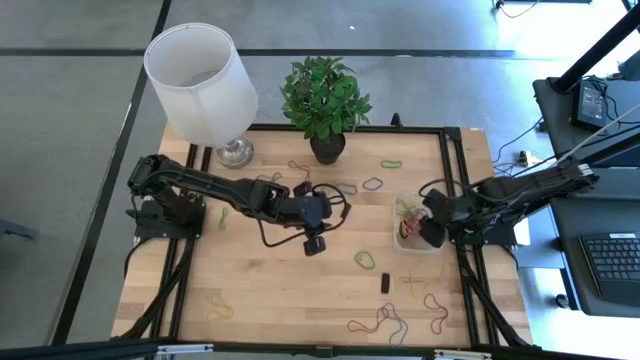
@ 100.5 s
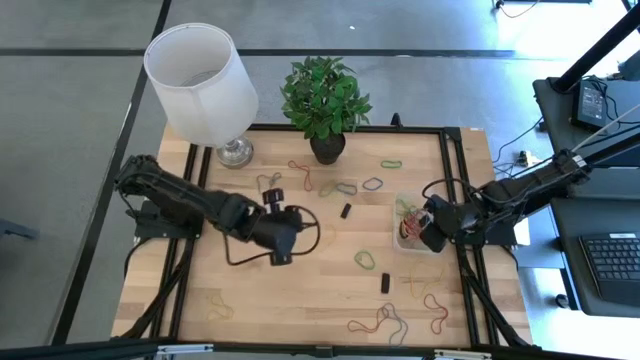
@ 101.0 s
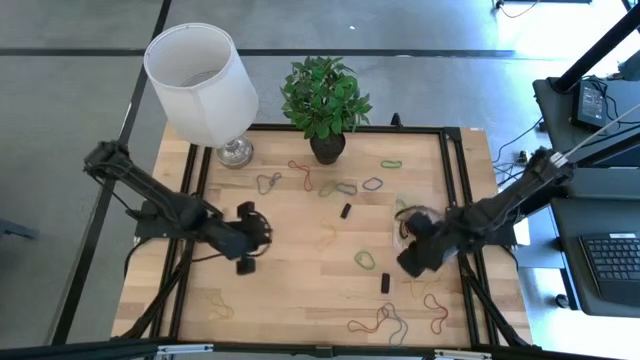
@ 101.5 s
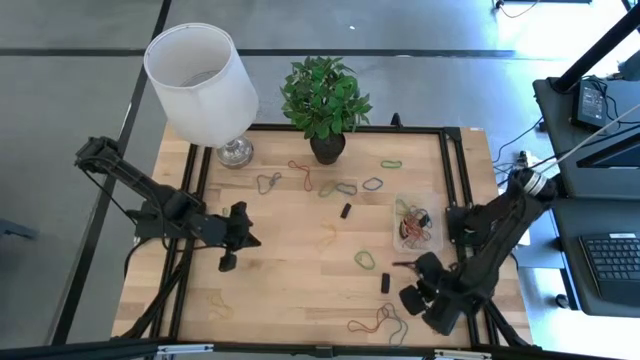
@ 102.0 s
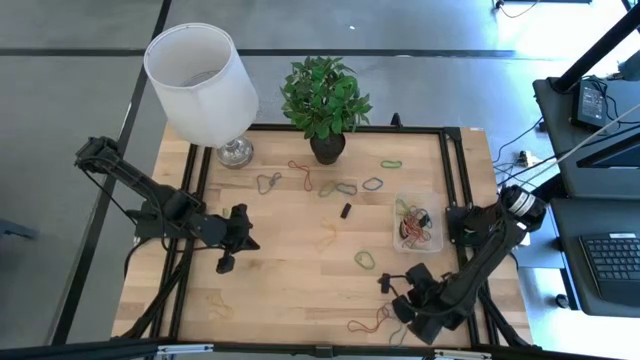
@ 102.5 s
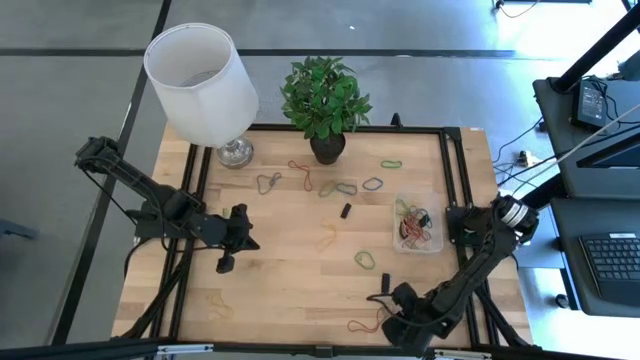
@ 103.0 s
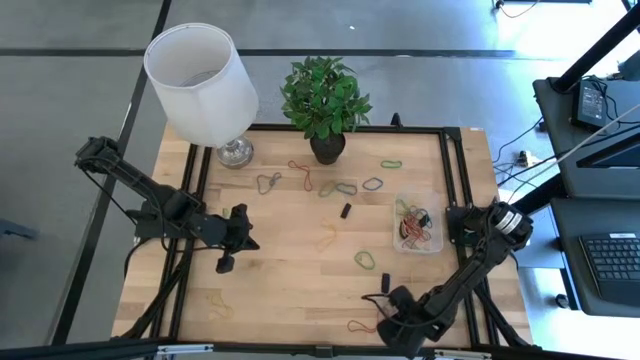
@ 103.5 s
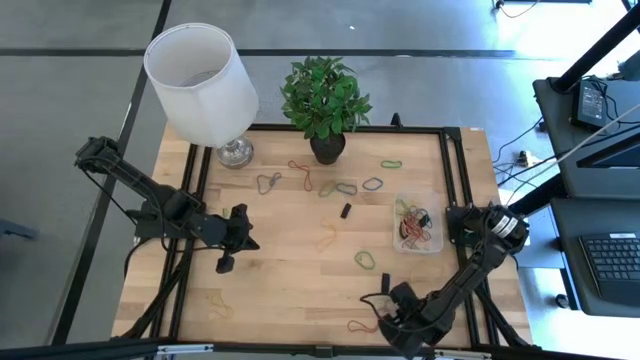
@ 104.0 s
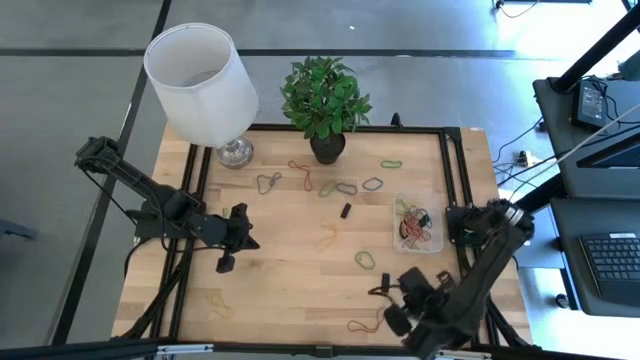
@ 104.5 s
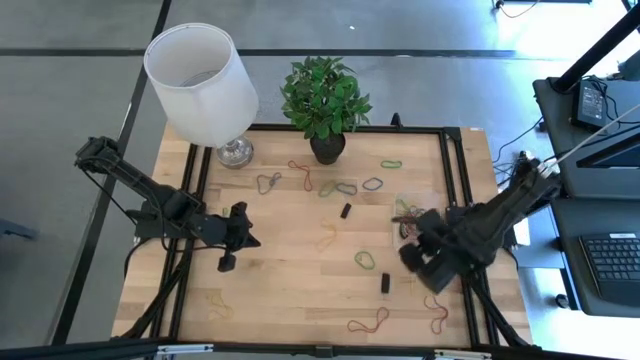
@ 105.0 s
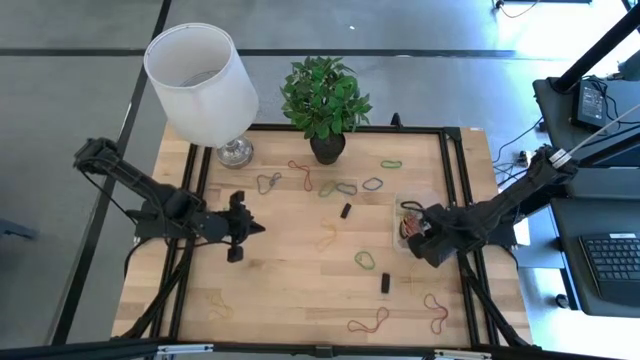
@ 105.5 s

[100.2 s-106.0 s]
Task: Pick and place rubber bands into bin
Put the blue rubber band into the transparent bin

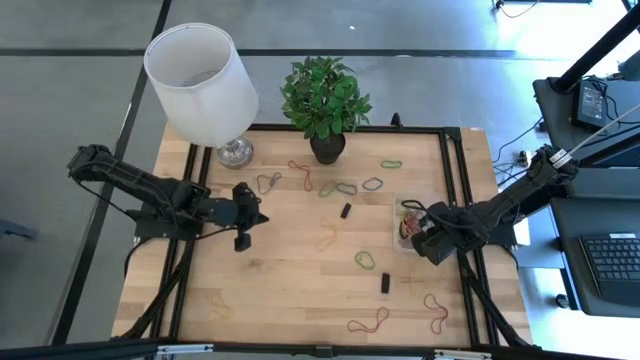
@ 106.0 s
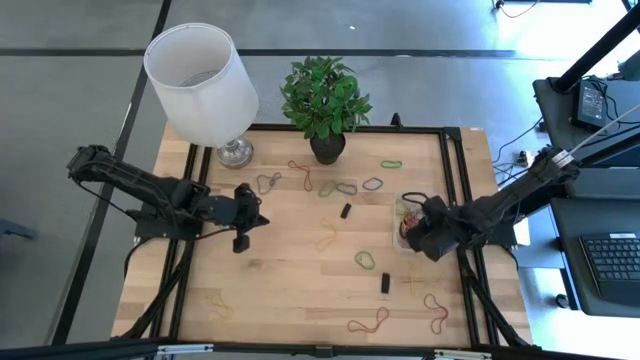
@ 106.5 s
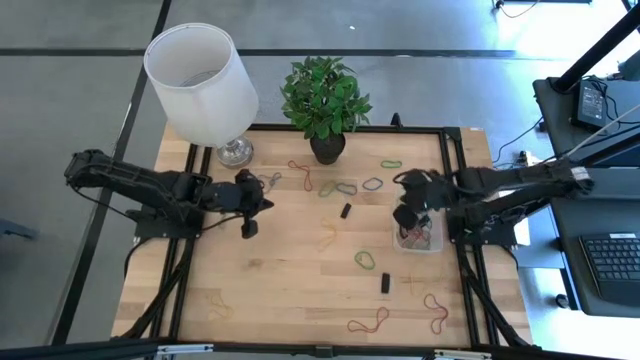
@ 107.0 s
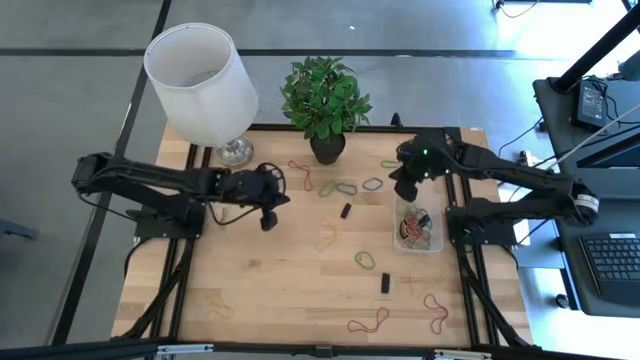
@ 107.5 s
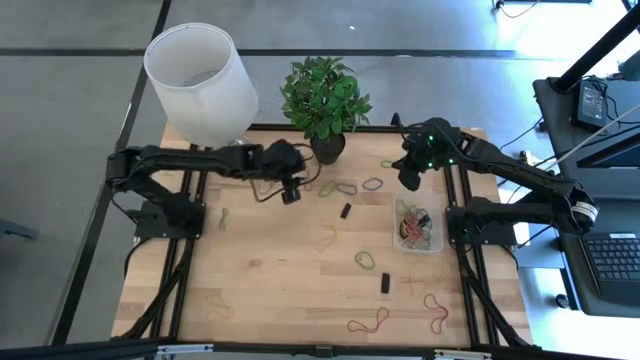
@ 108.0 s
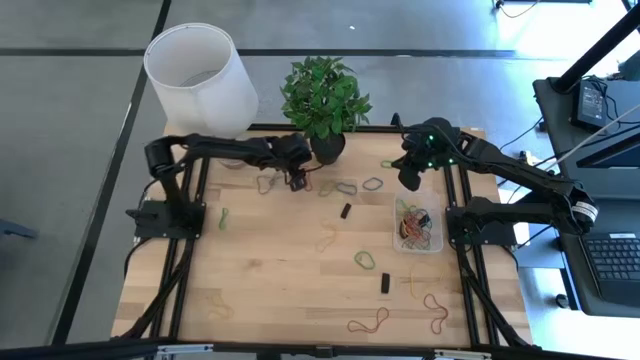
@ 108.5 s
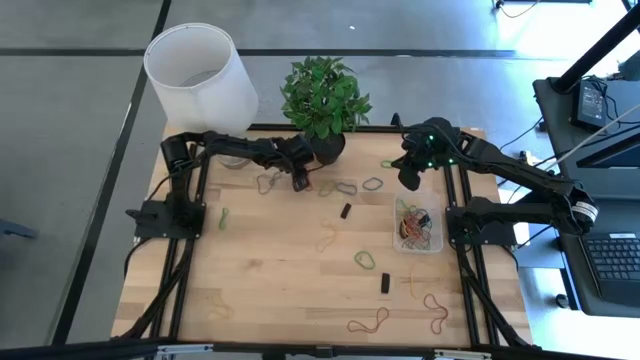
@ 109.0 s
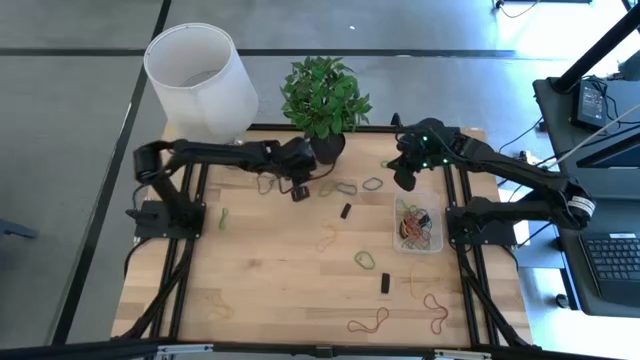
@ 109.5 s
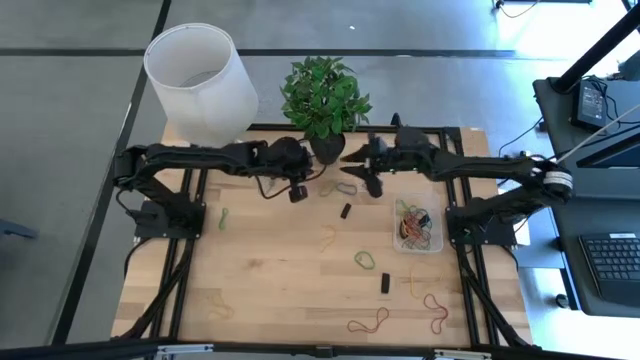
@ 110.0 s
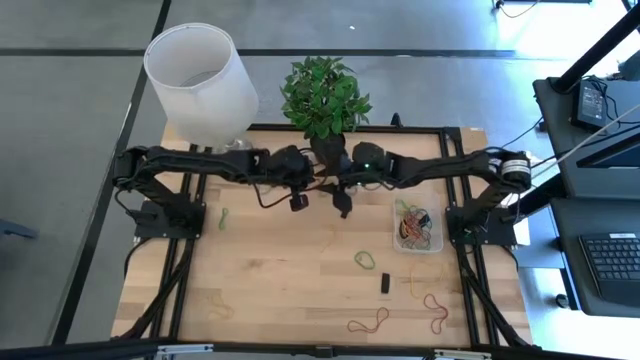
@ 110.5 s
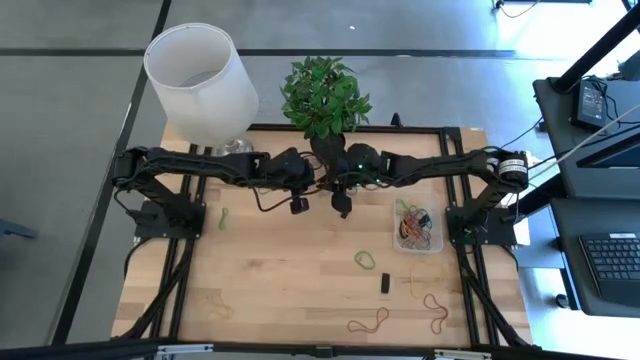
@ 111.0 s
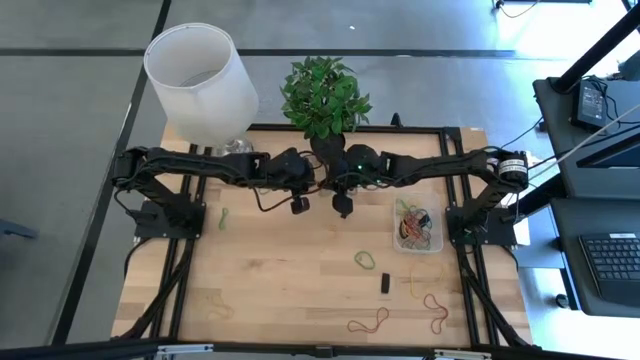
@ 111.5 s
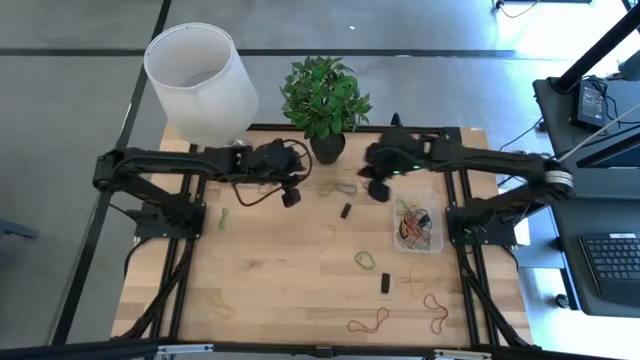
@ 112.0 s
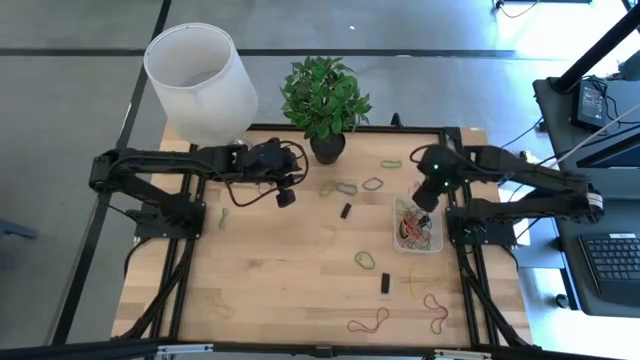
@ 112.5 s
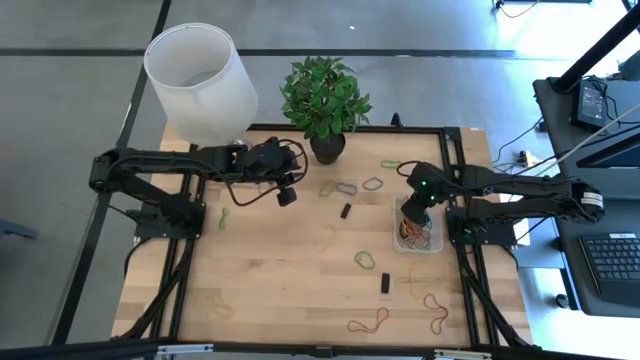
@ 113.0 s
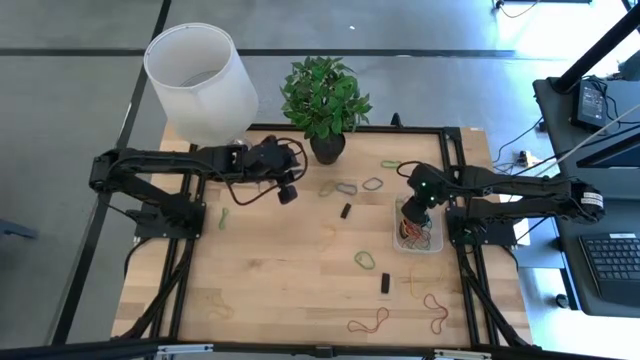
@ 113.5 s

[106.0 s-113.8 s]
Put the red rubber band into the transparent bin

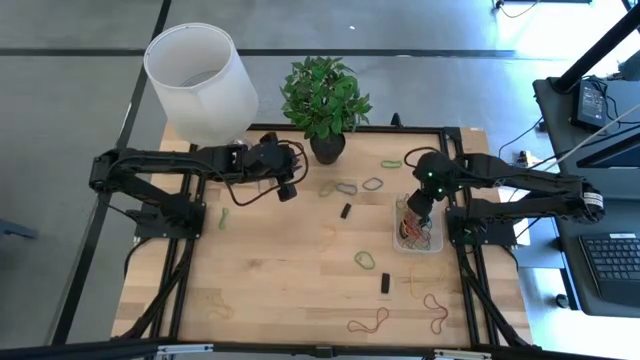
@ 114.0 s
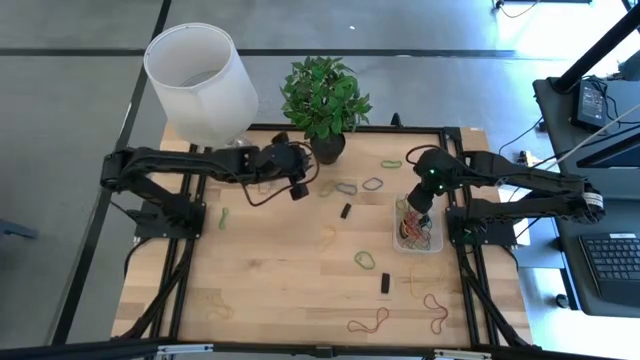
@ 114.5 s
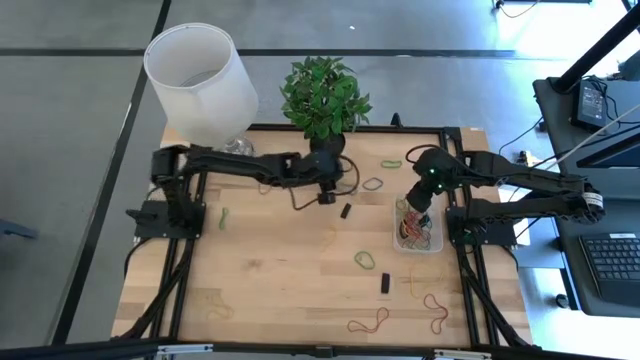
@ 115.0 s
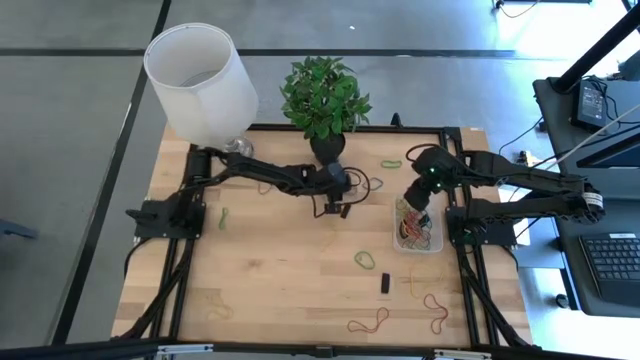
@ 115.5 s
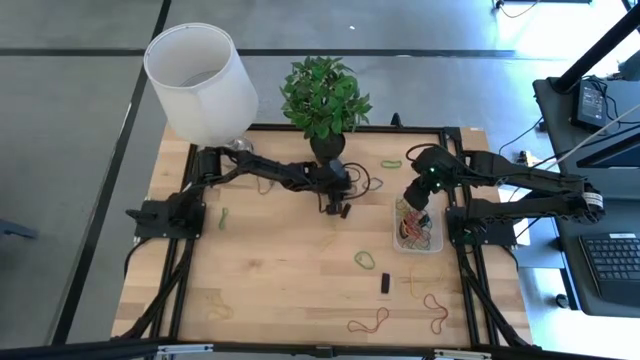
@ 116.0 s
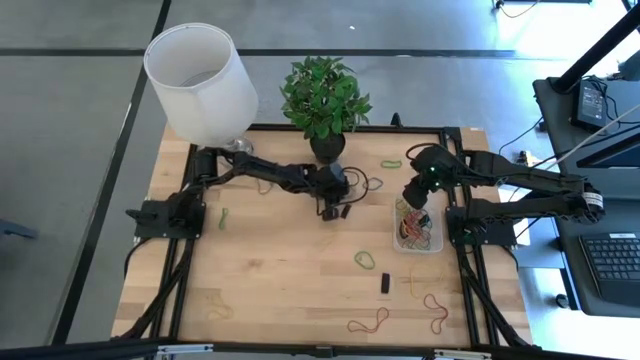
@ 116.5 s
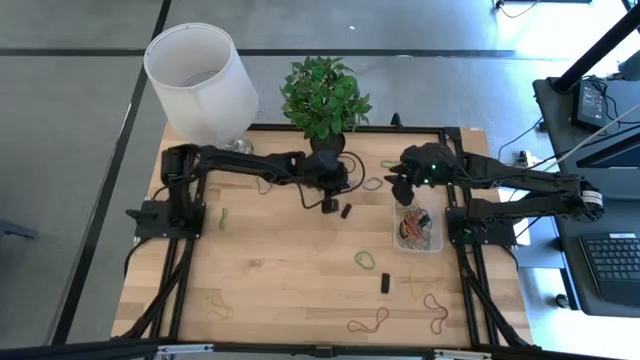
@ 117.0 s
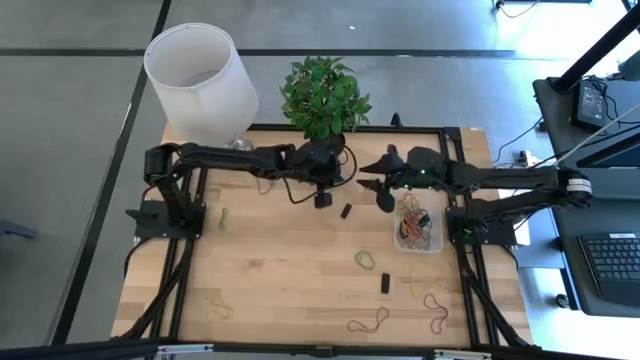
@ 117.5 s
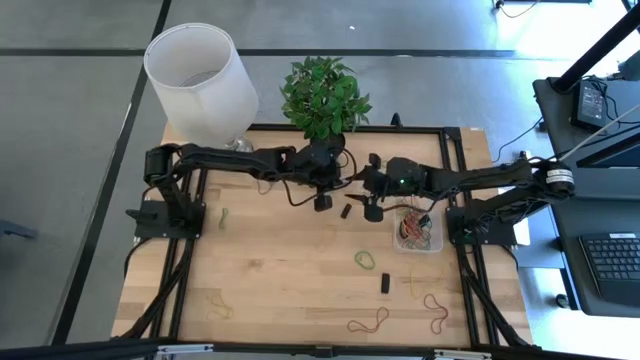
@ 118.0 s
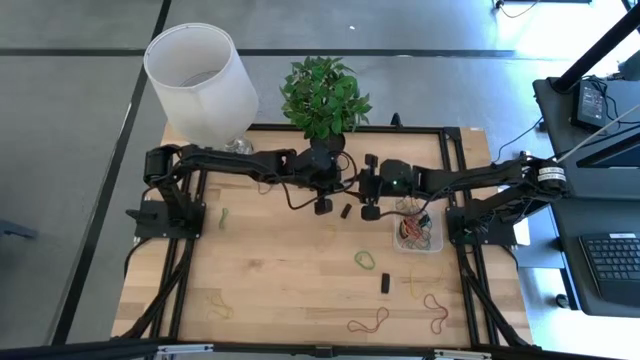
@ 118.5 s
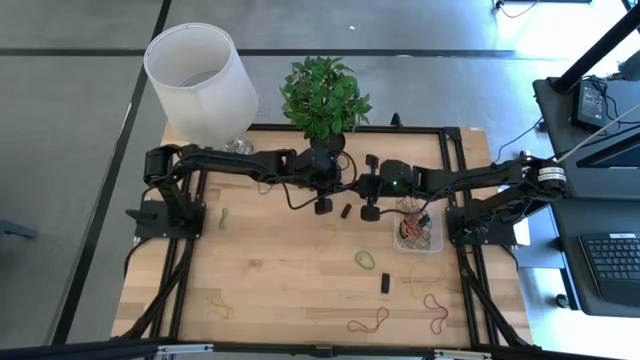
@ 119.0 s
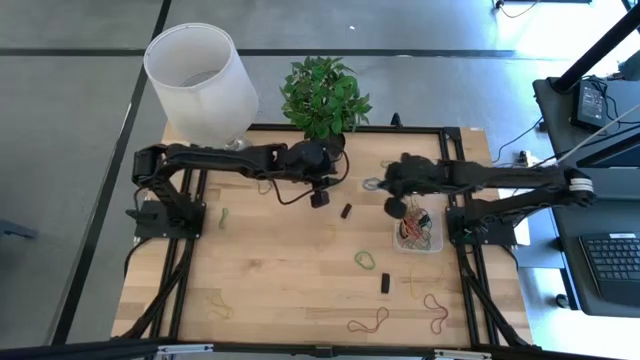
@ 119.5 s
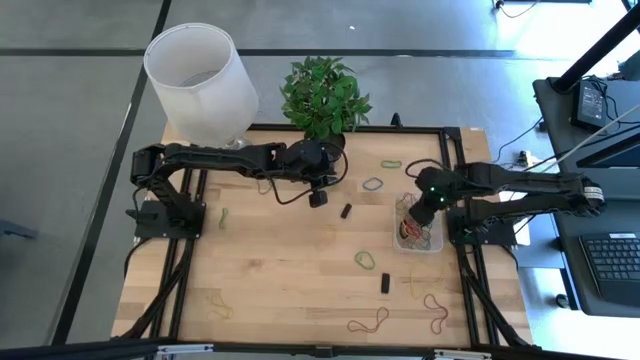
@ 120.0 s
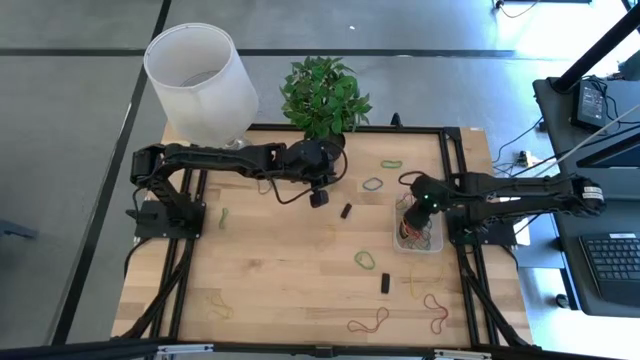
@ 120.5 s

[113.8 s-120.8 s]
Put the blue rubber band into the transparent bin
